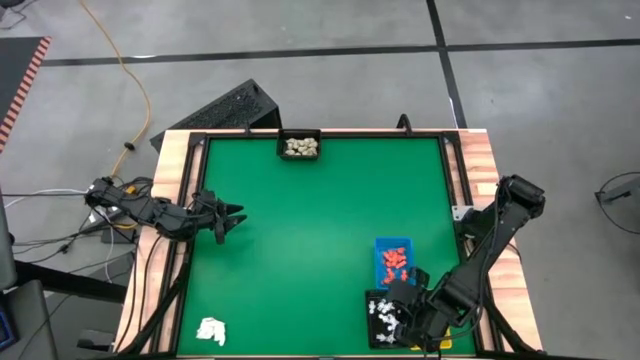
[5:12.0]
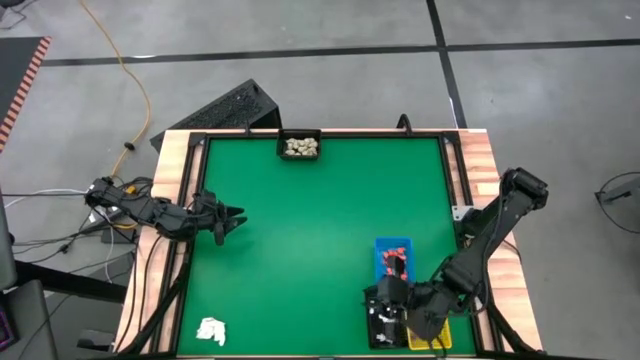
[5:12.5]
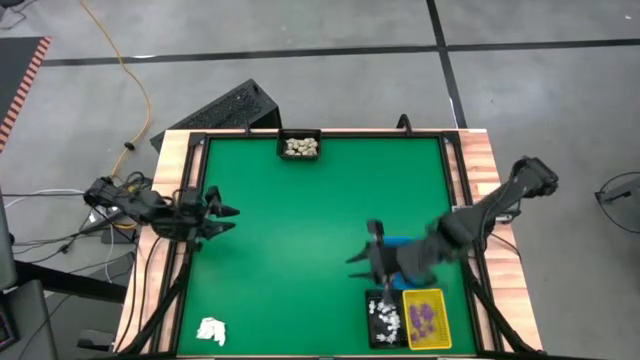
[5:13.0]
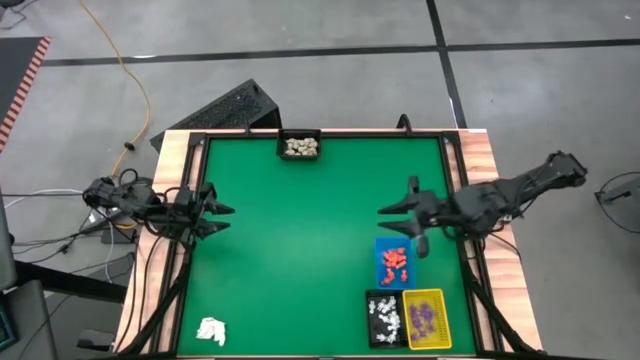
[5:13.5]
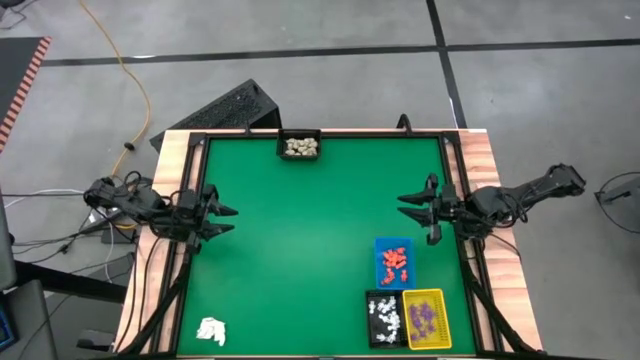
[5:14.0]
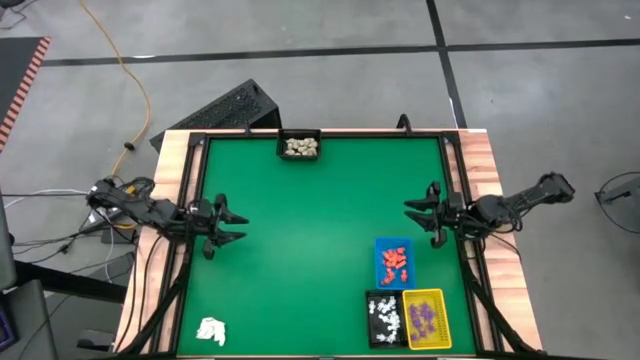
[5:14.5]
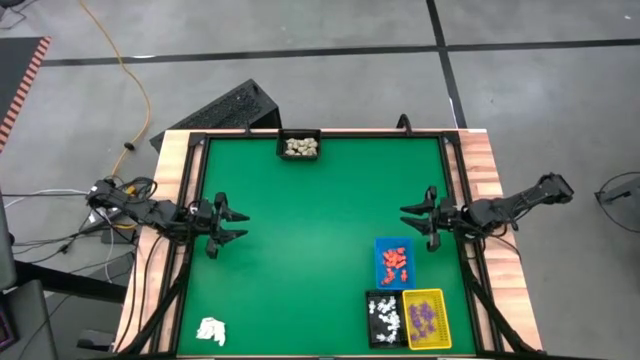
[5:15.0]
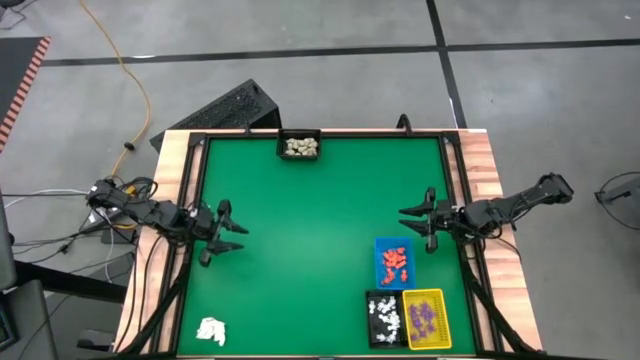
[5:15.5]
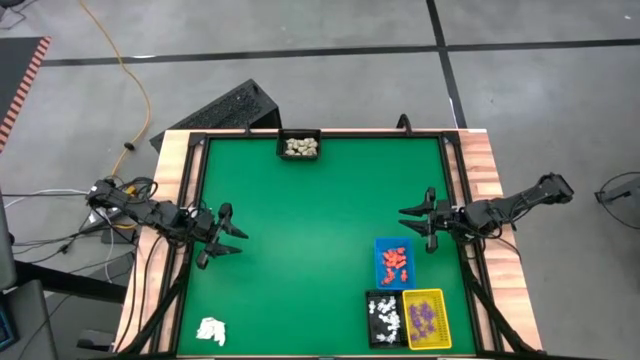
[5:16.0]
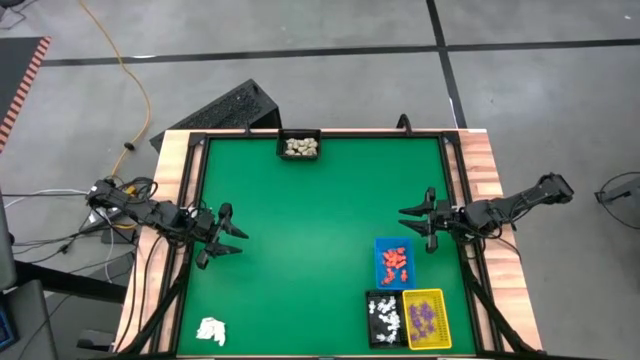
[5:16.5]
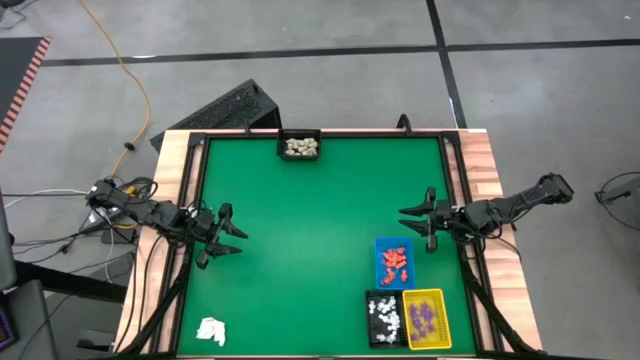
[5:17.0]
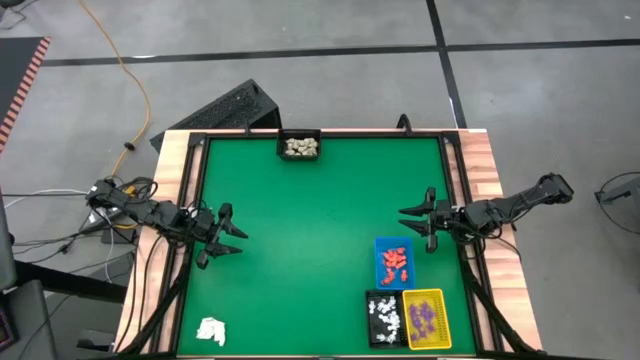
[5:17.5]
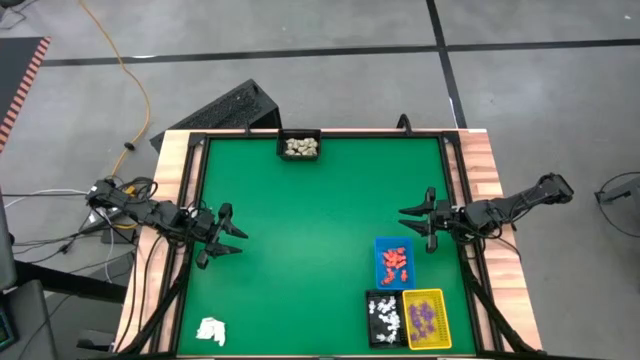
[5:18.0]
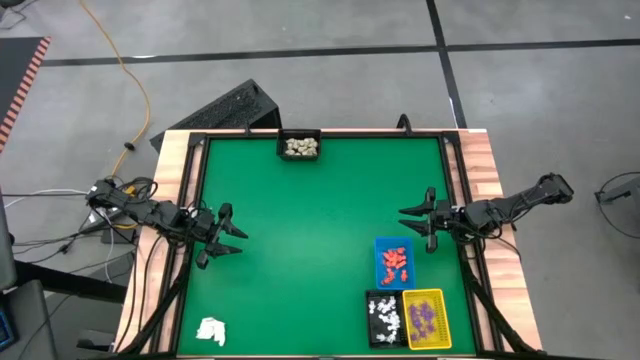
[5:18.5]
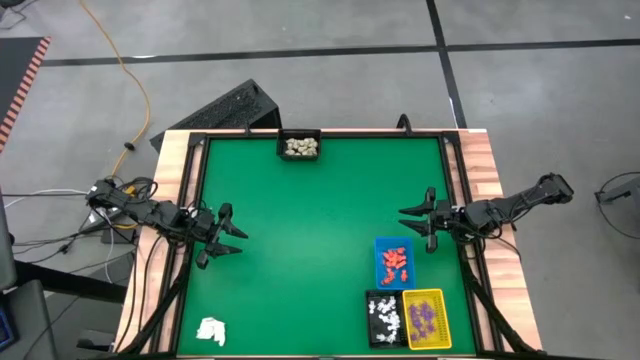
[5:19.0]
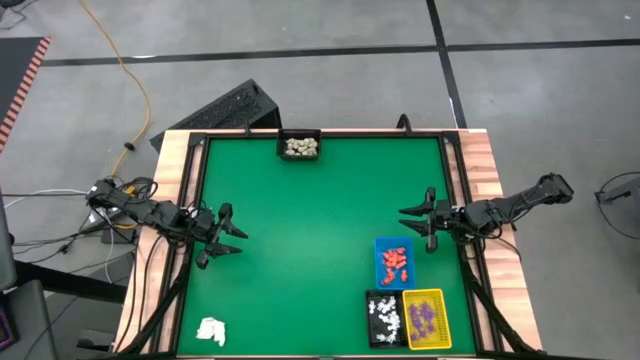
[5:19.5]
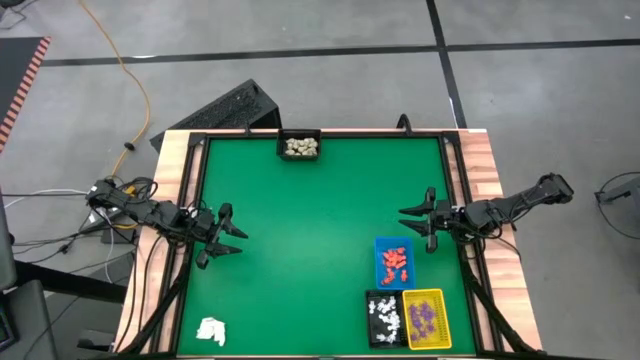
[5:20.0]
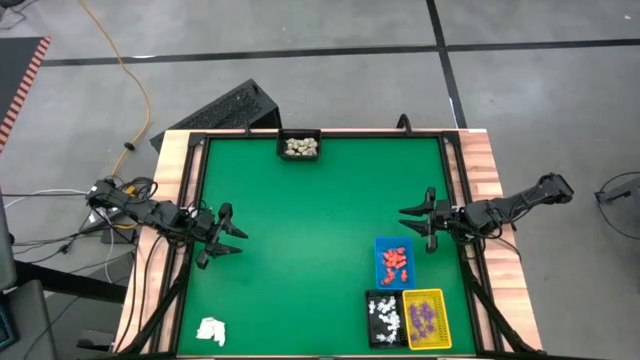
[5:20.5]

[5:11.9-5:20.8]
Task: Sort Halloween decoration
Return to Home Position

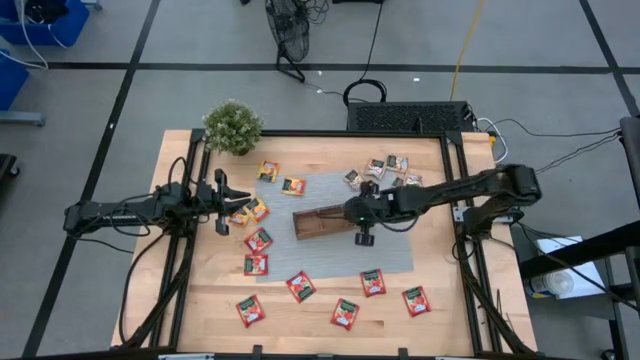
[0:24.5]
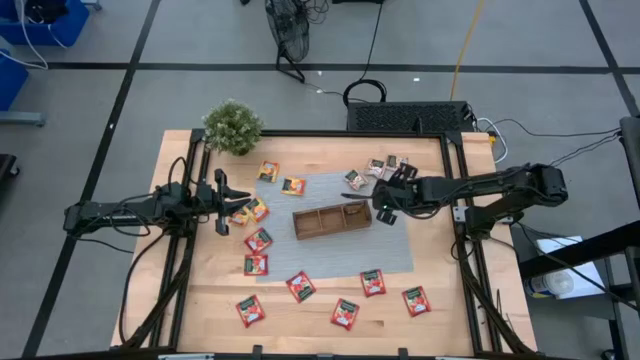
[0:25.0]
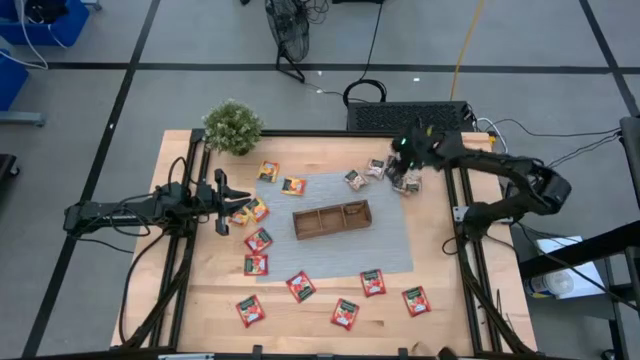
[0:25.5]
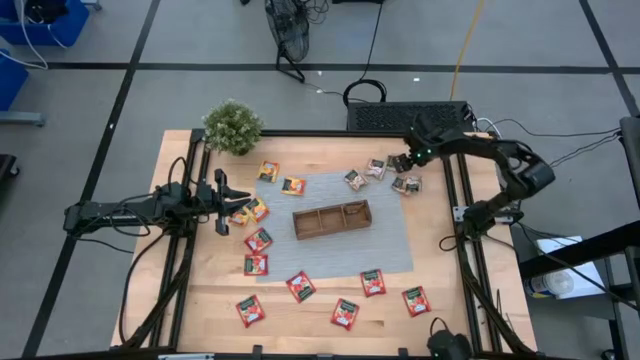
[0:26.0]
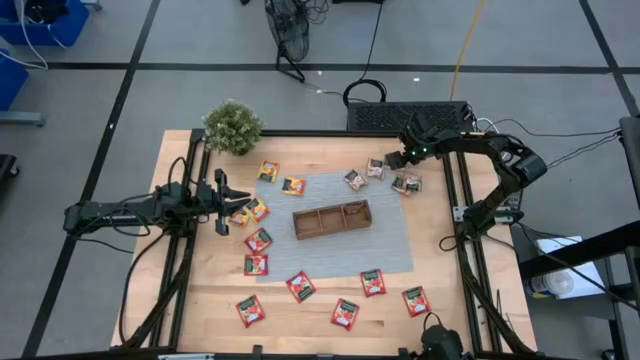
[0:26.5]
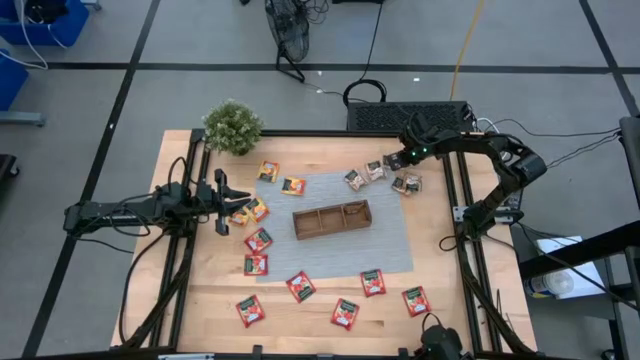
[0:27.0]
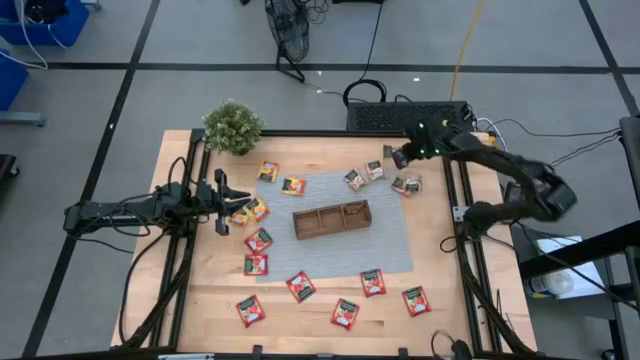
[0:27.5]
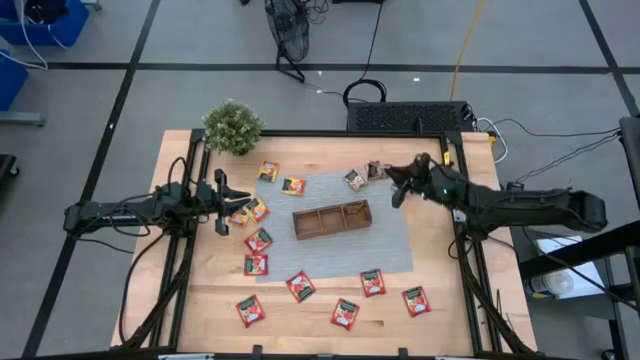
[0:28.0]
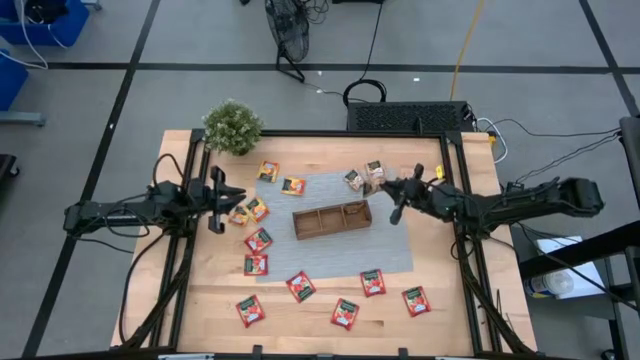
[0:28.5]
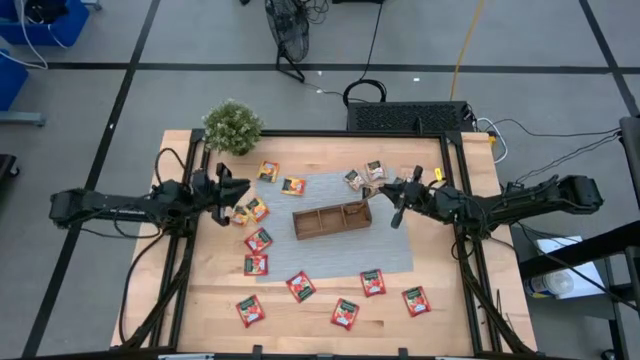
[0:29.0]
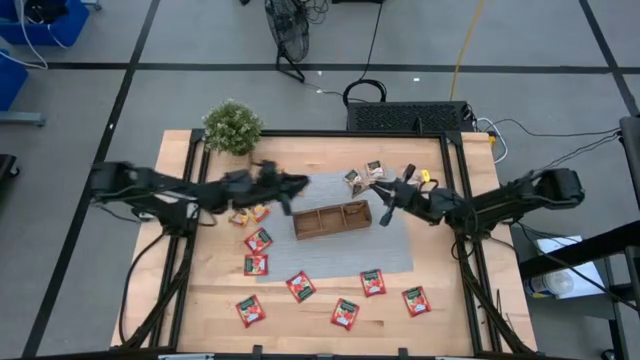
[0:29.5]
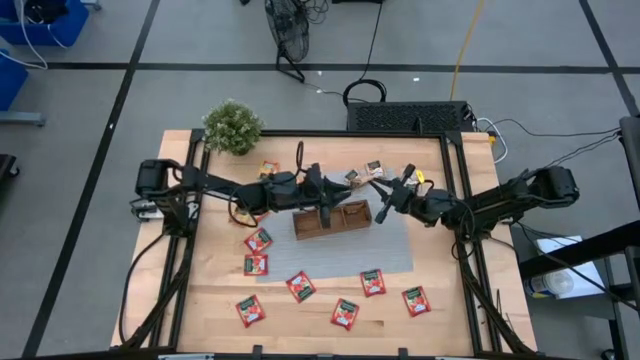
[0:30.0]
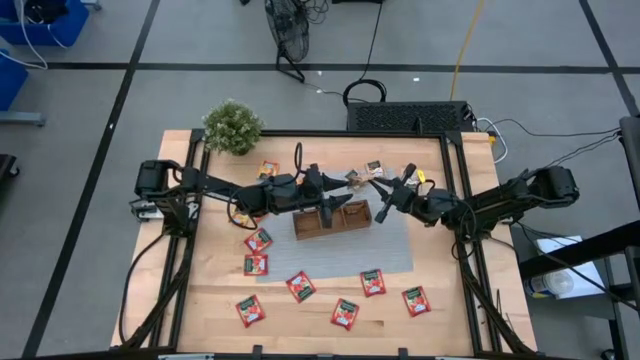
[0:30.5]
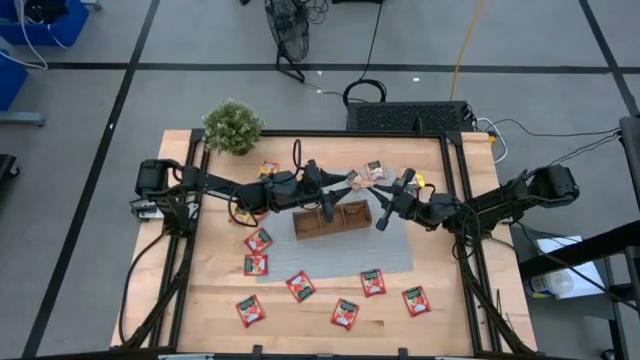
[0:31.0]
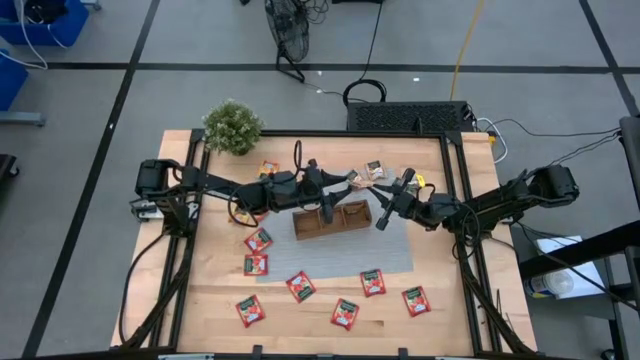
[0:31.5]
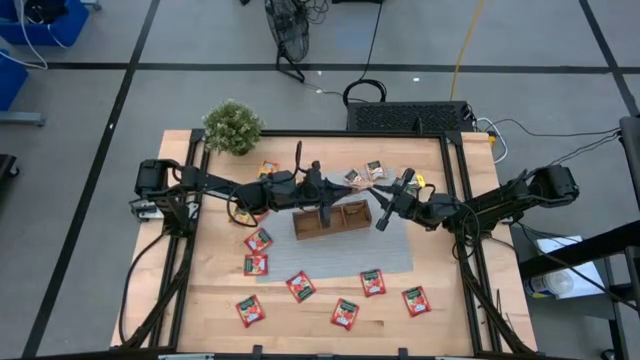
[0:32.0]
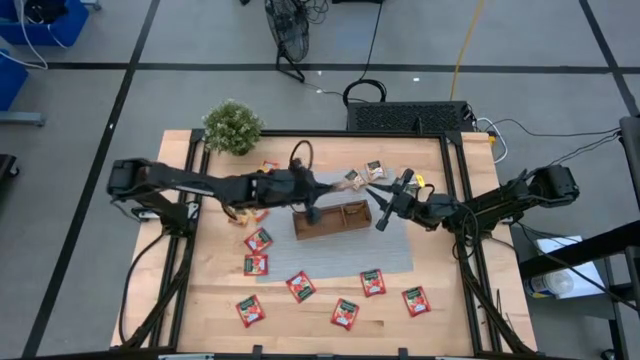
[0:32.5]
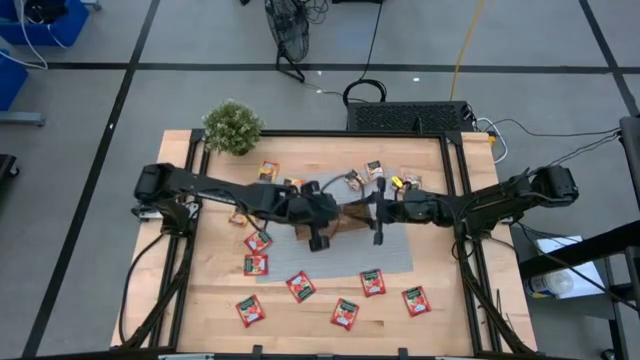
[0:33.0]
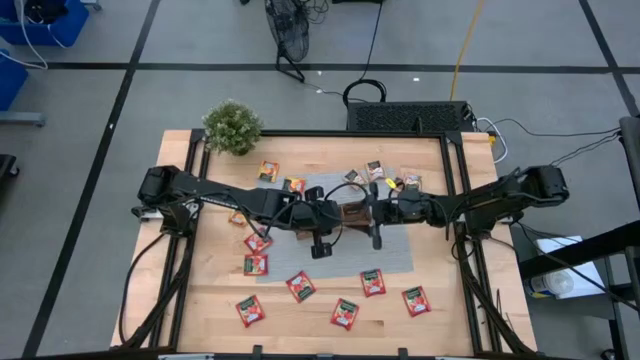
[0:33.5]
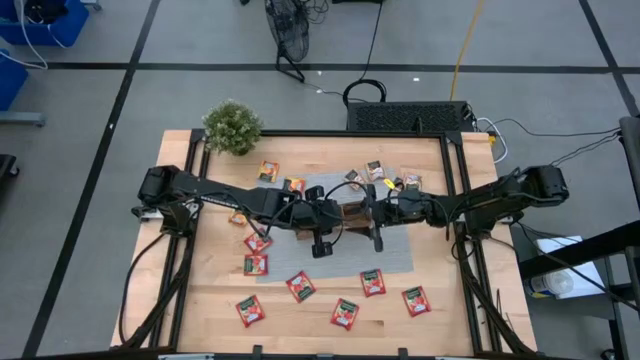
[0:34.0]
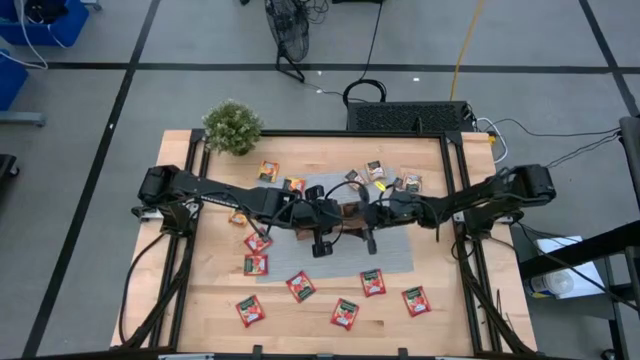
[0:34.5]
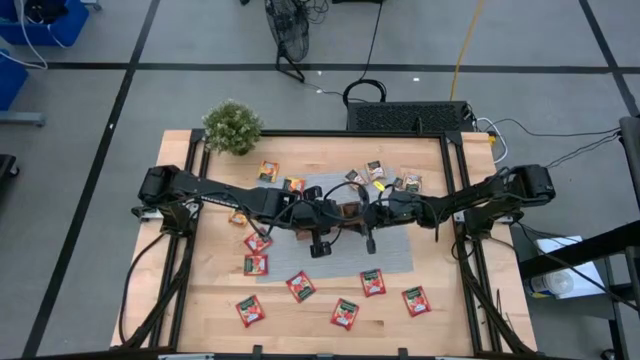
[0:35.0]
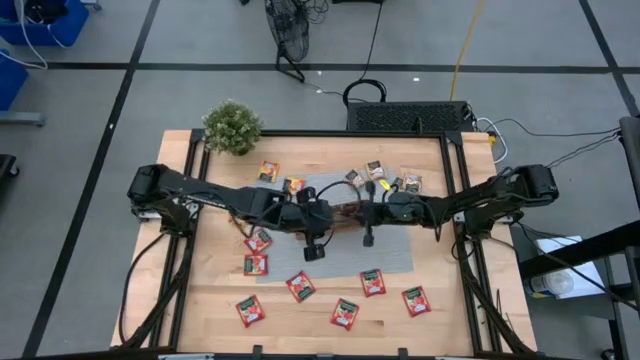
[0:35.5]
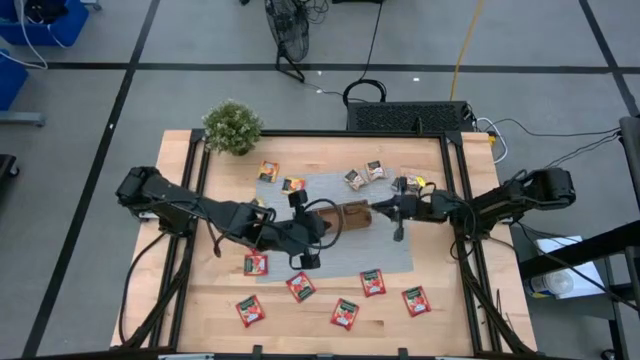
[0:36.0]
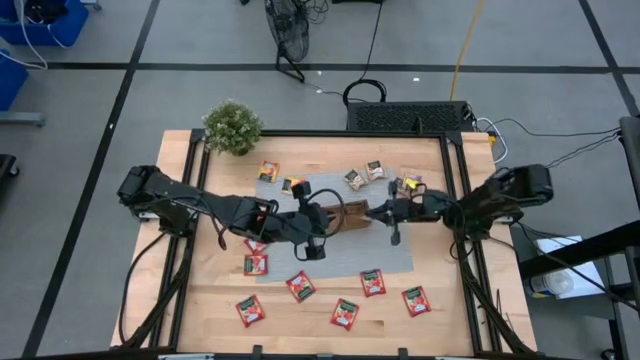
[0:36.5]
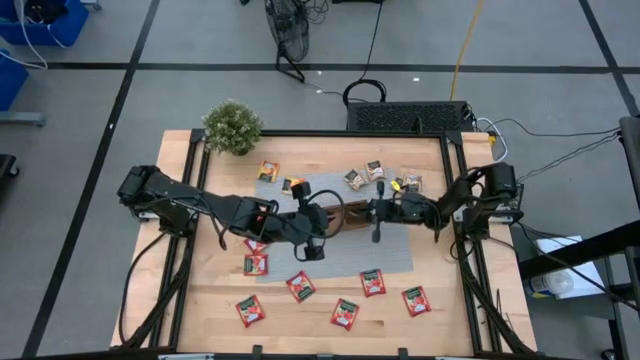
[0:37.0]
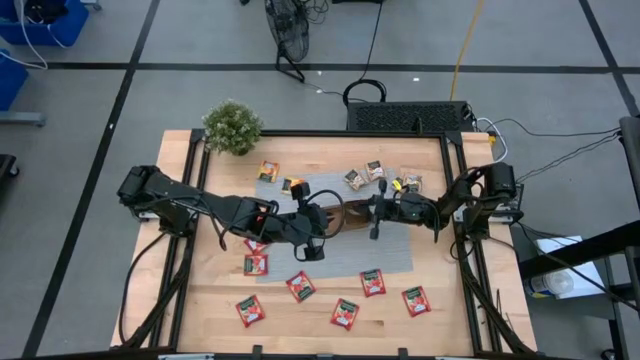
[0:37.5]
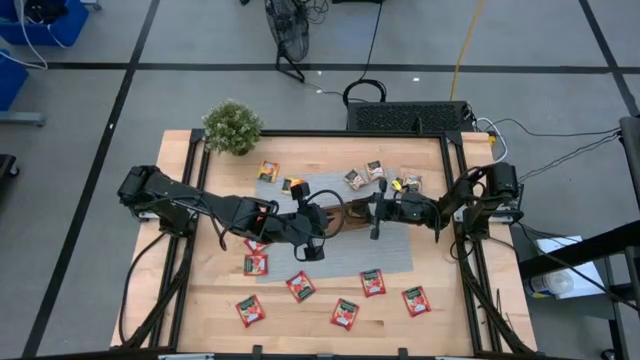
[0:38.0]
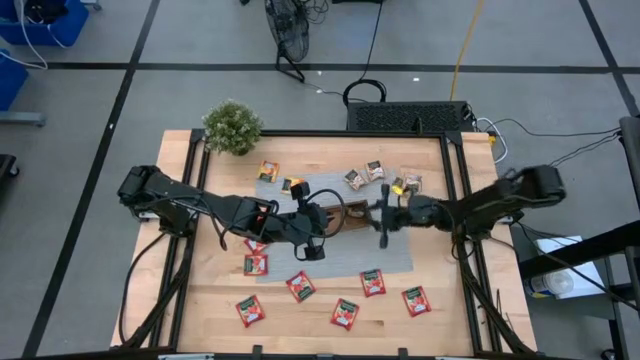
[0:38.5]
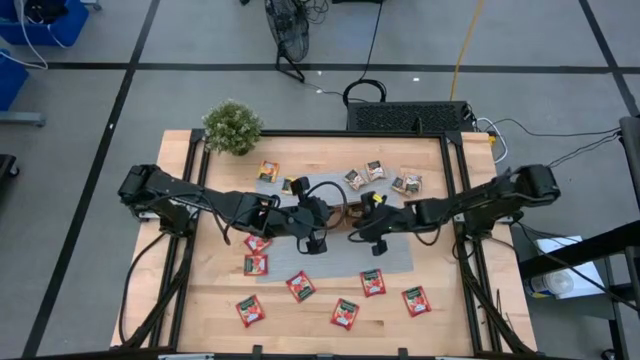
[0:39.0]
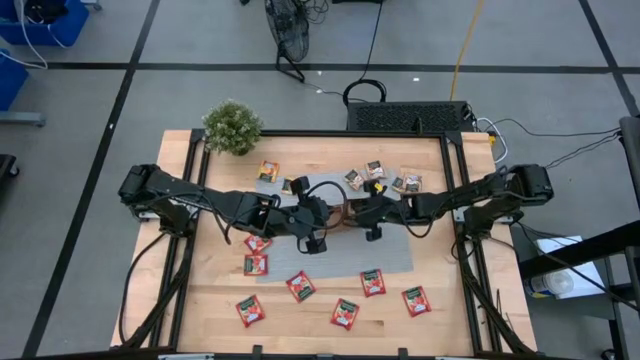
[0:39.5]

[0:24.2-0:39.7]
Task: Pick & Place Tea
Put the brown tea bag into the right section of the wooden organizer
